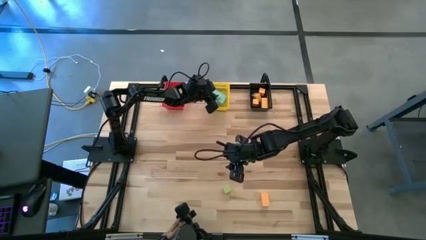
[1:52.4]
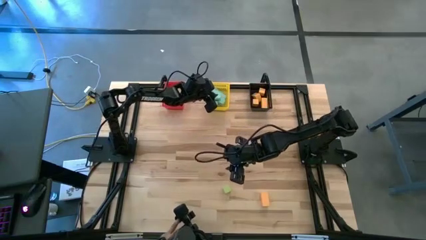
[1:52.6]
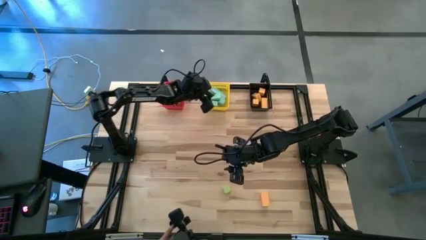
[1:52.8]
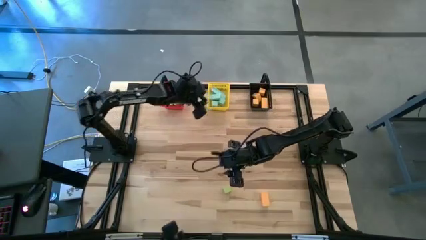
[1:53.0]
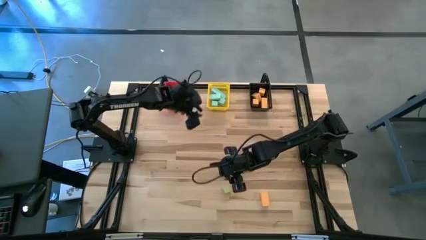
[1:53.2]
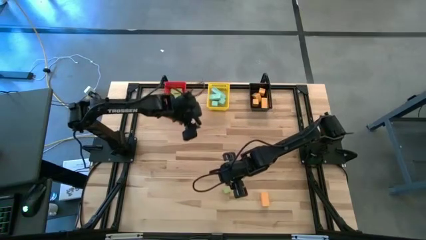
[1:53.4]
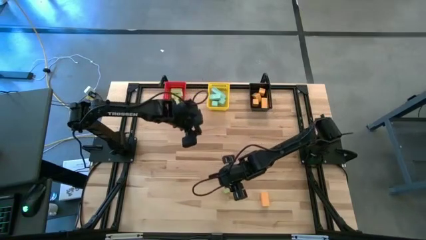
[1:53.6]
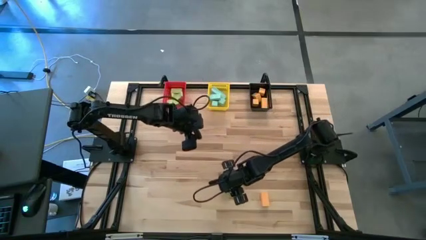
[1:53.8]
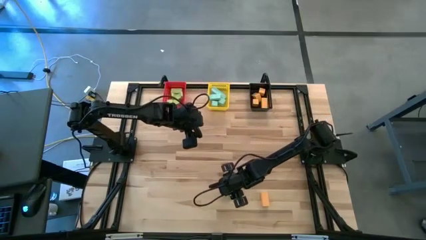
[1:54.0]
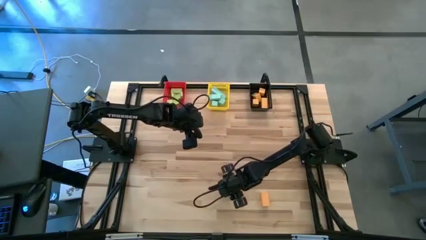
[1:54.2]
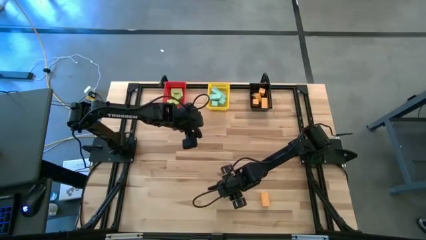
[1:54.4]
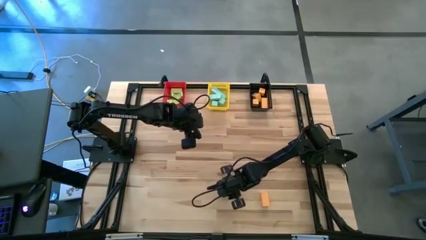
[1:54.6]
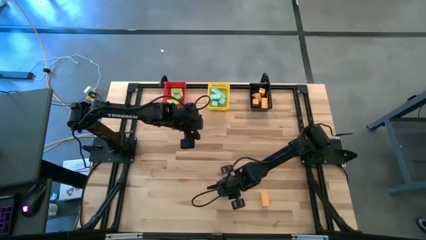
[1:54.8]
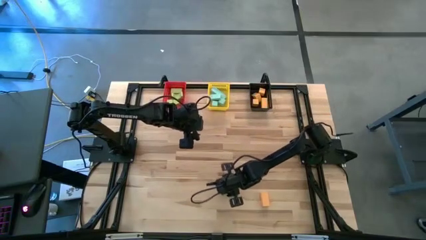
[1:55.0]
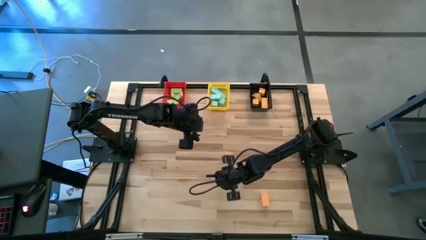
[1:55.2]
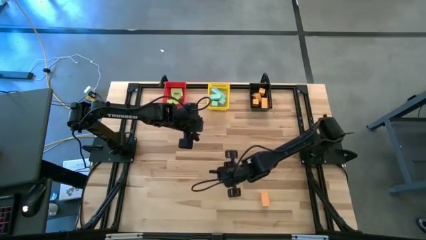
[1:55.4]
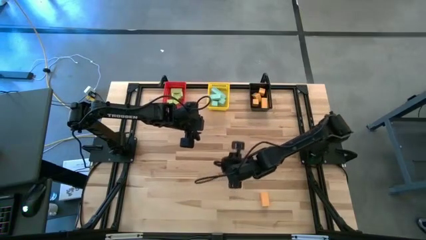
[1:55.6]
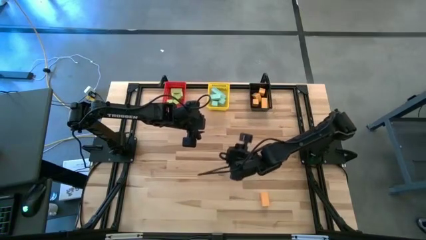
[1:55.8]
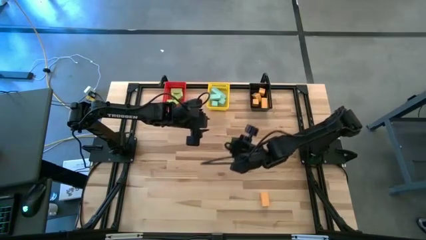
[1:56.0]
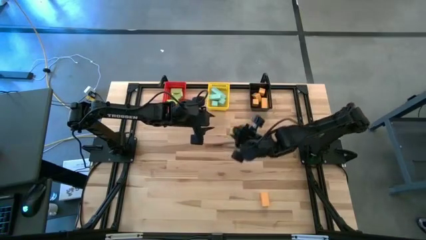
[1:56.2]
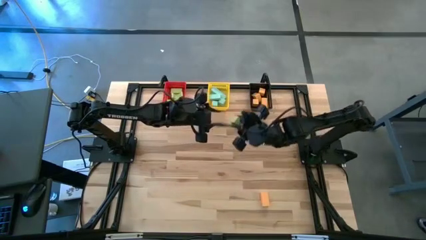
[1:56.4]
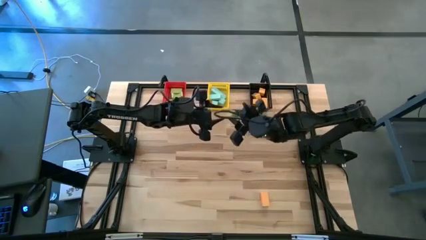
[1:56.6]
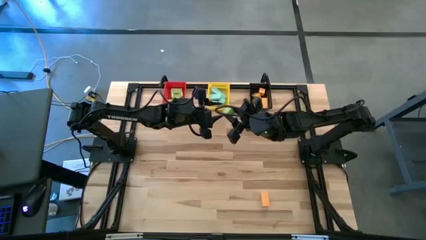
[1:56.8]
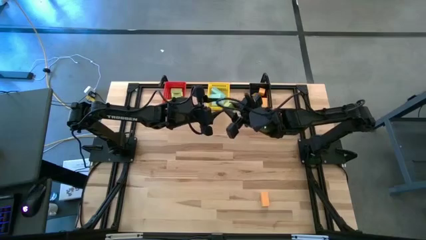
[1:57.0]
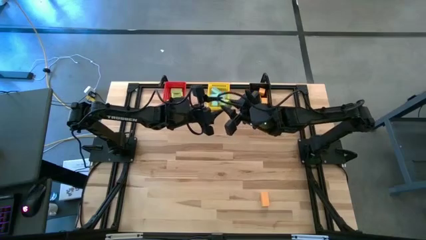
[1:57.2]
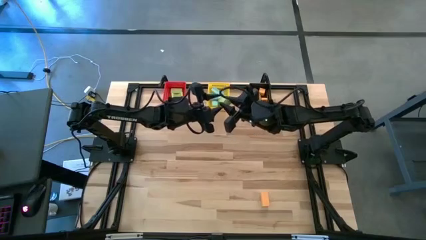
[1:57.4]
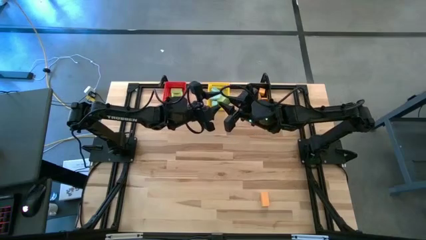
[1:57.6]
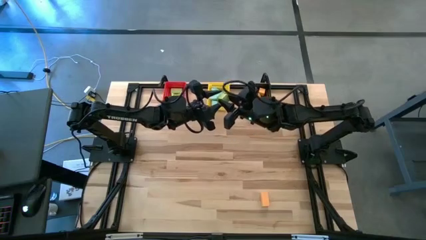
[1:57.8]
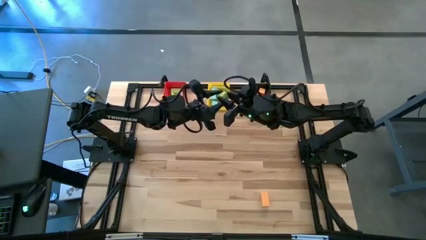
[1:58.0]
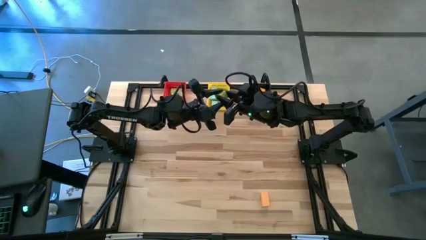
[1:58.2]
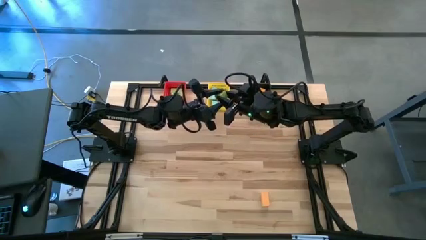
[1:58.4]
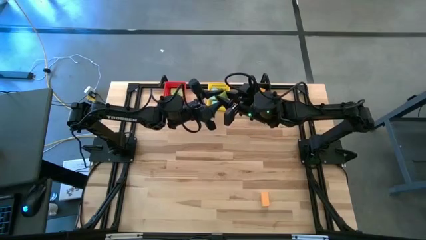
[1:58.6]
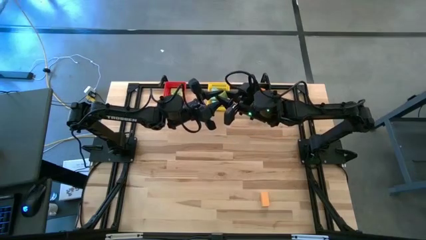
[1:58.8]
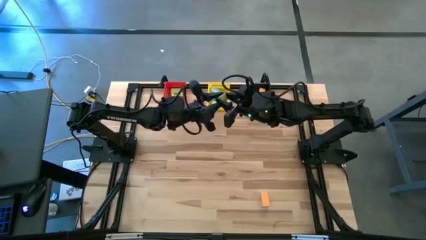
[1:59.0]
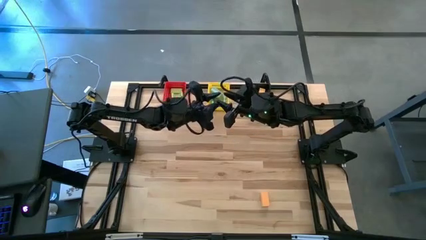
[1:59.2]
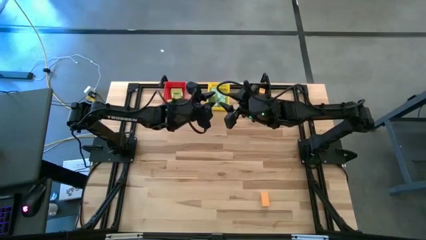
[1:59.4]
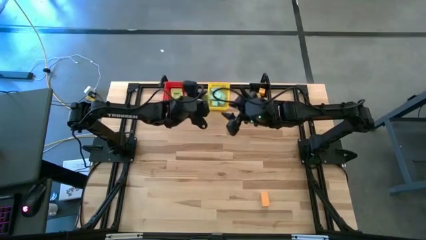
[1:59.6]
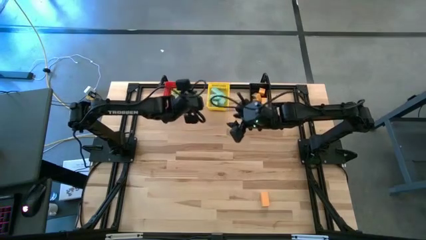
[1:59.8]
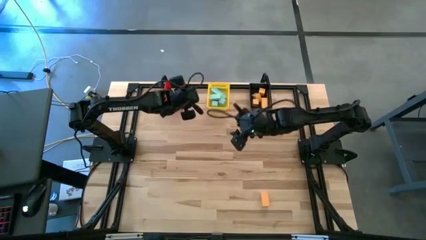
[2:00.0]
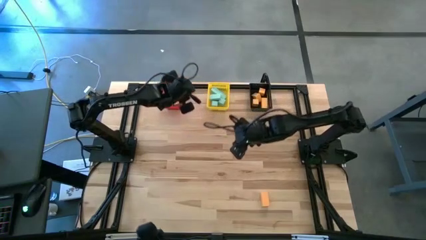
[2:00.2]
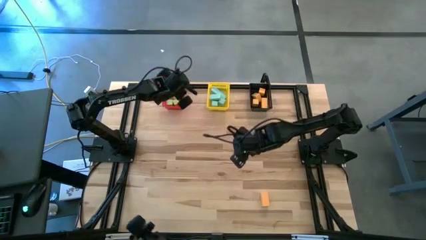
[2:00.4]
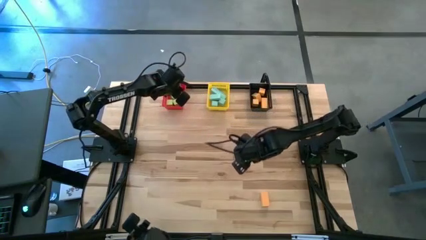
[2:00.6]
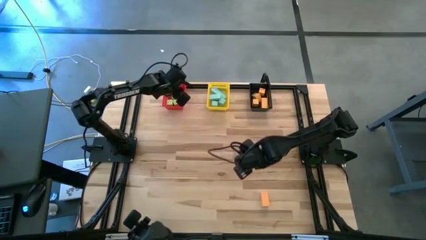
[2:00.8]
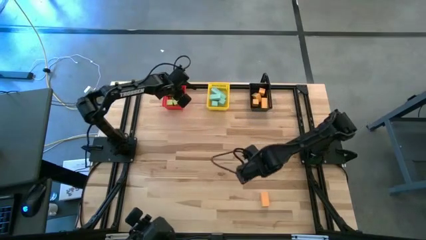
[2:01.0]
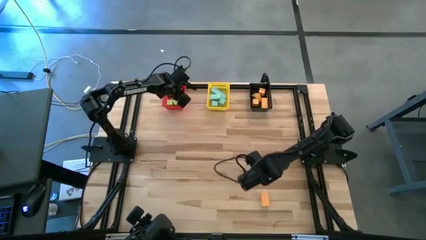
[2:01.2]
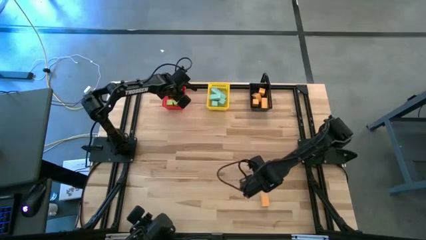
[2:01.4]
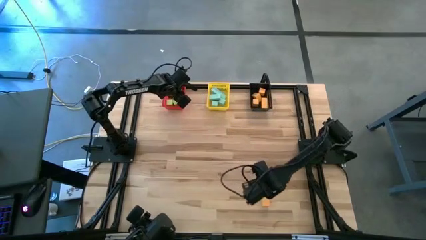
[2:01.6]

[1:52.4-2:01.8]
Task: Sort & place blocks by color
Put the green block into the red bin

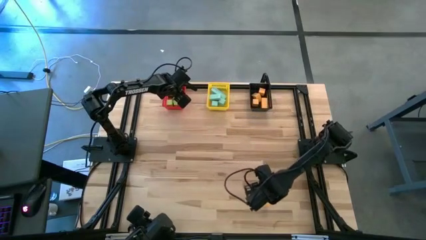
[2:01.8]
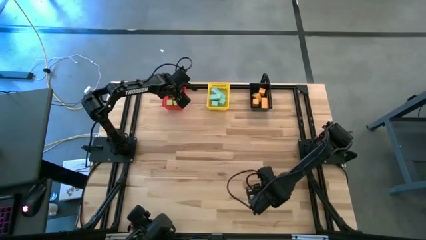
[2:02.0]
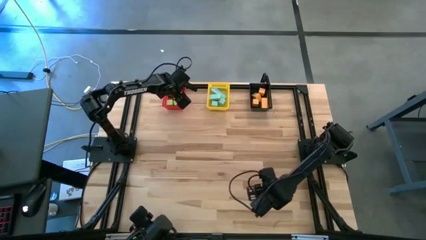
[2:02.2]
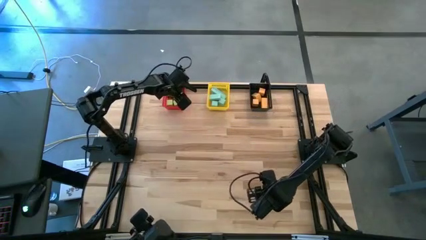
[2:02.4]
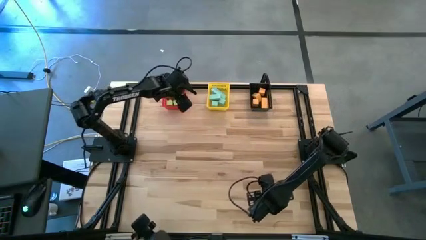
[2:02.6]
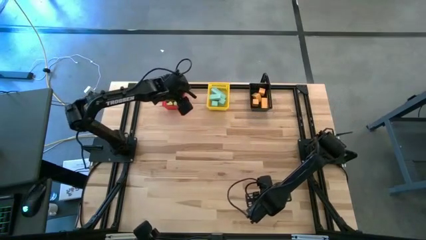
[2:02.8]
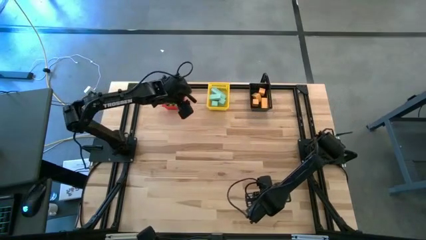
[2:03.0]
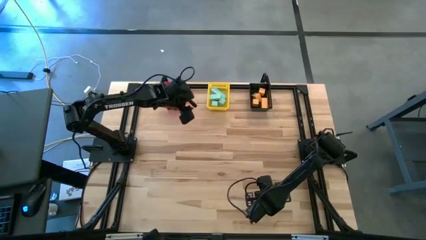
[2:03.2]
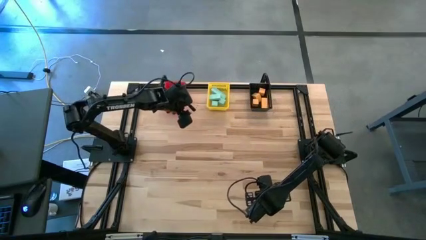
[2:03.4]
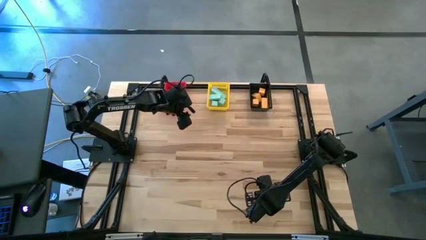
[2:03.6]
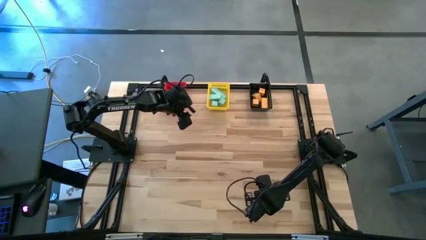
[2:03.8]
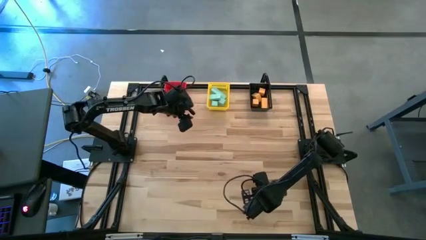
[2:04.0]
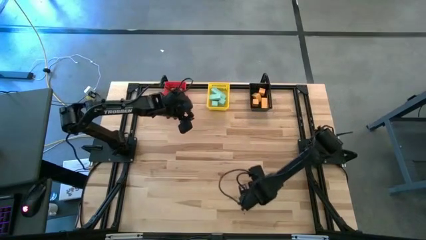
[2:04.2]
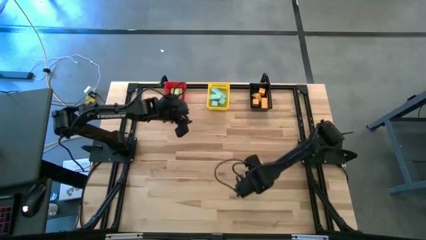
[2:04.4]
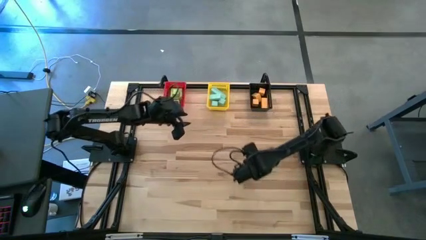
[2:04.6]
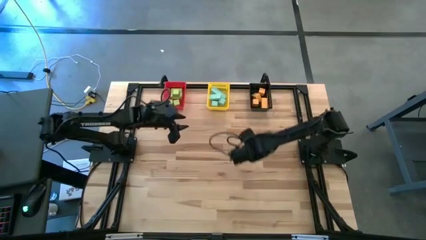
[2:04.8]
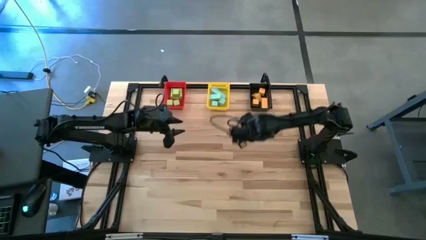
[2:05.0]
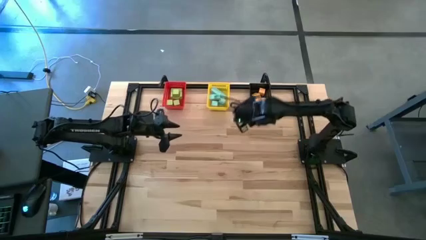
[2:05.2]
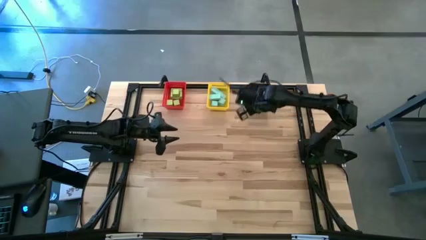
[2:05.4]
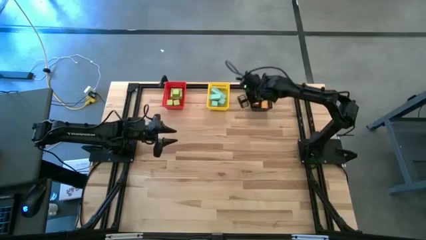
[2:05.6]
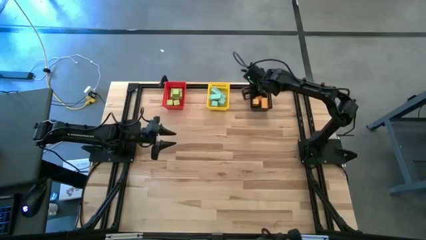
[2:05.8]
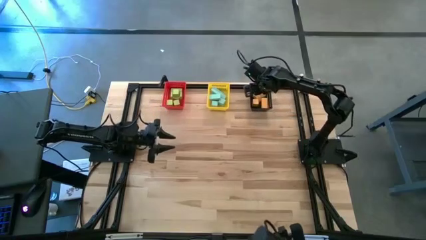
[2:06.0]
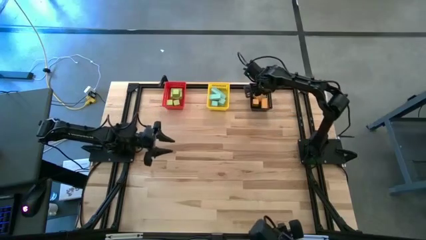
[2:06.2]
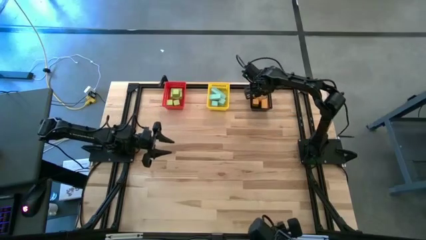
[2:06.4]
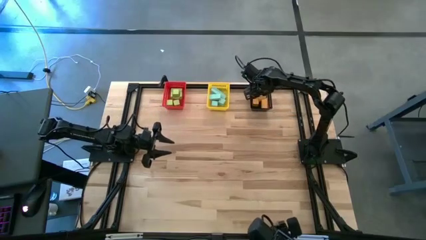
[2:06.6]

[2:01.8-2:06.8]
Put the yellow block into the black bin

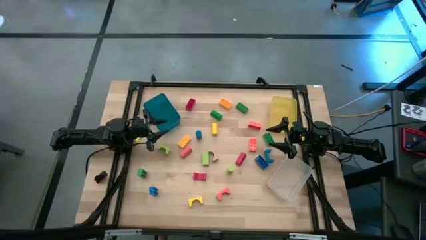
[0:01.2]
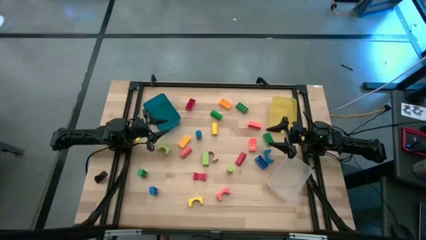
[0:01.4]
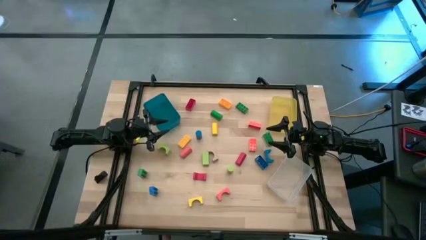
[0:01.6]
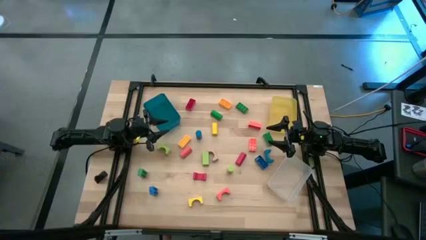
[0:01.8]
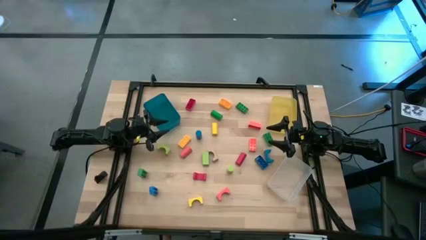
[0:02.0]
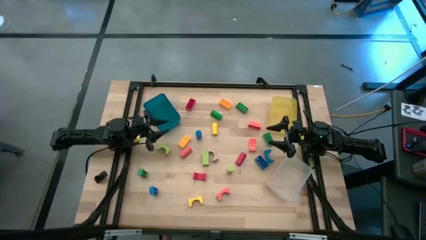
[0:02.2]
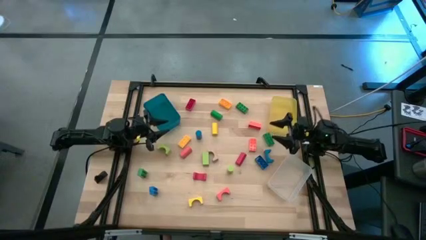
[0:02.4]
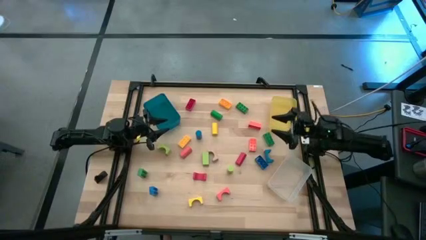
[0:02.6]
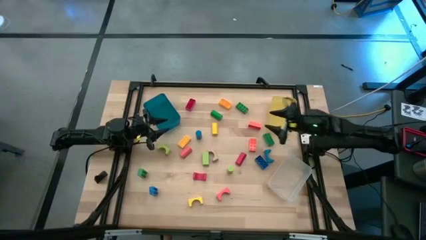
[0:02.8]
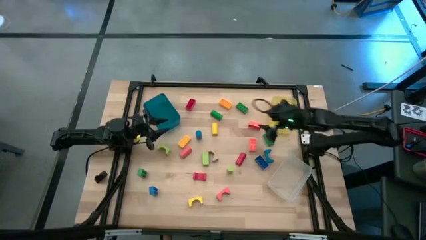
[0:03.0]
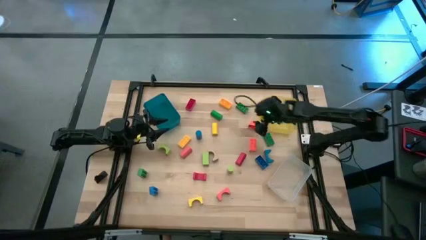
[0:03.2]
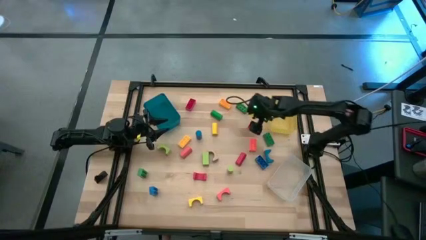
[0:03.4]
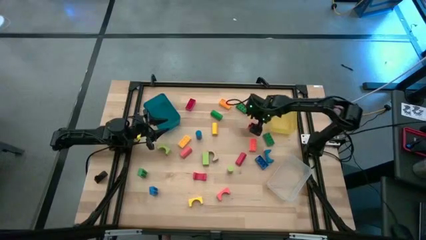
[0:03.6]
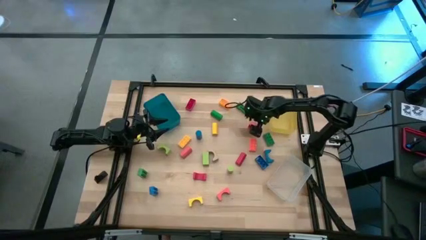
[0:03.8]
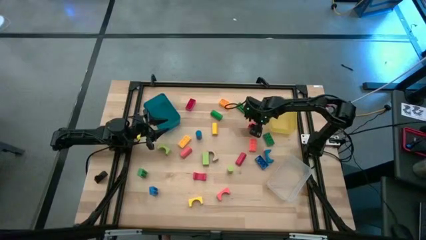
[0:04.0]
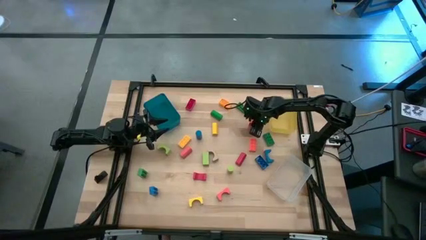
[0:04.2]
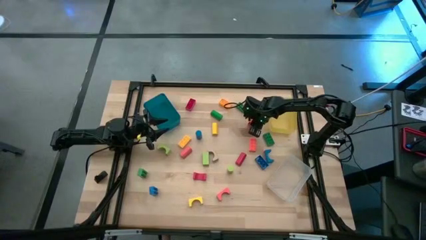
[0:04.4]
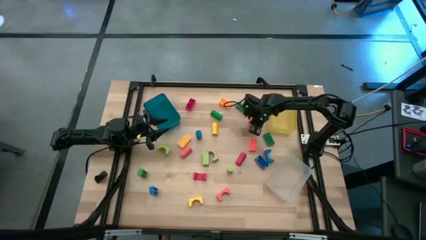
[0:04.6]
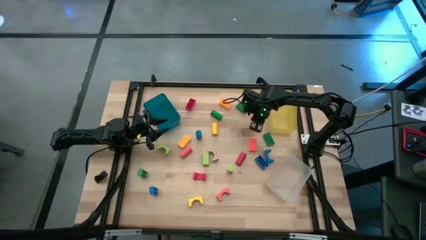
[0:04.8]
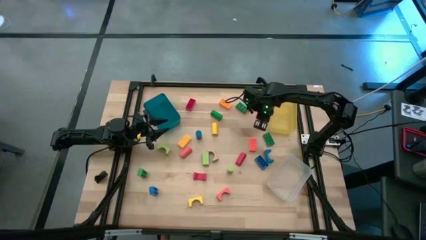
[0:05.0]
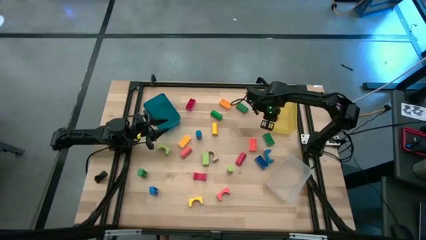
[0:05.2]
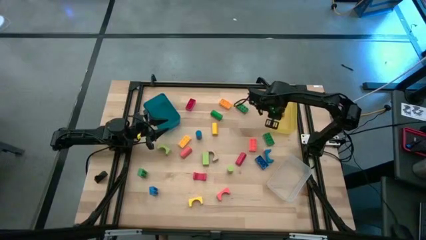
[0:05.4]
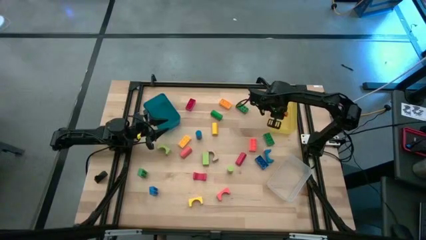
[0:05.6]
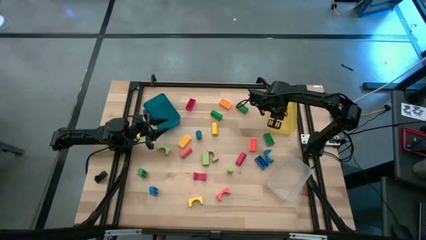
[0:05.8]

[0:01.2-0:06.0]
Task: Sort blocks by size
Put the orange game piece into the yellow bin
